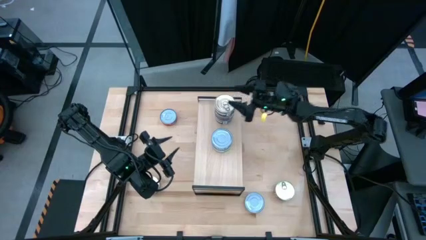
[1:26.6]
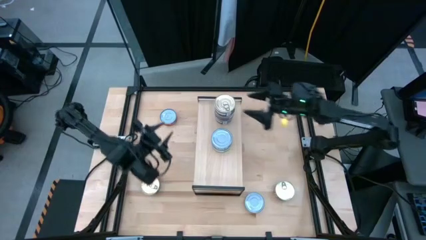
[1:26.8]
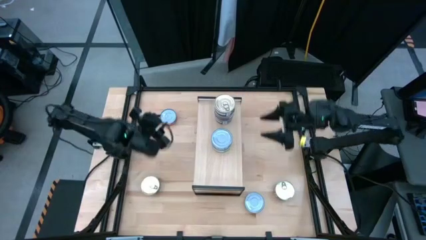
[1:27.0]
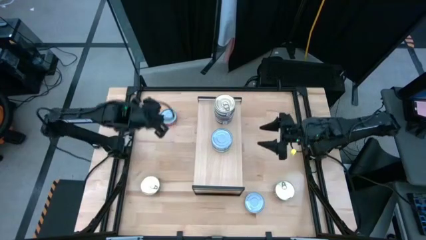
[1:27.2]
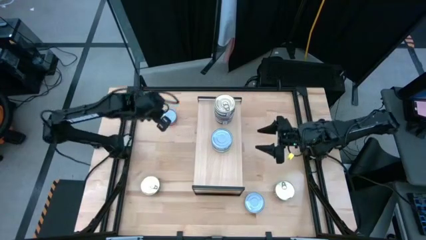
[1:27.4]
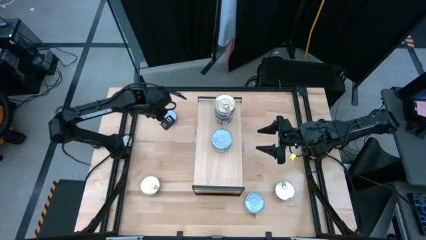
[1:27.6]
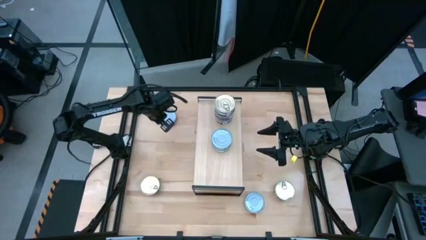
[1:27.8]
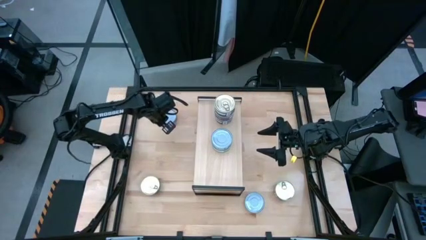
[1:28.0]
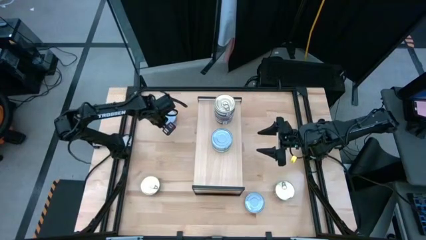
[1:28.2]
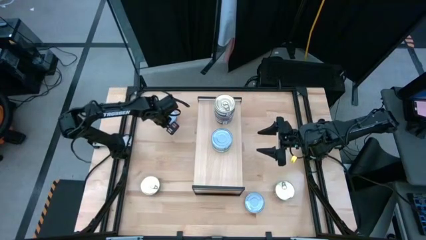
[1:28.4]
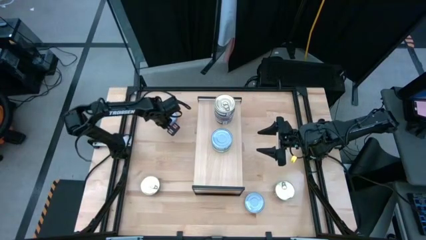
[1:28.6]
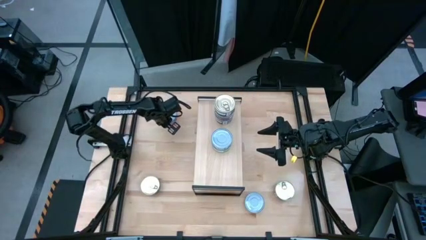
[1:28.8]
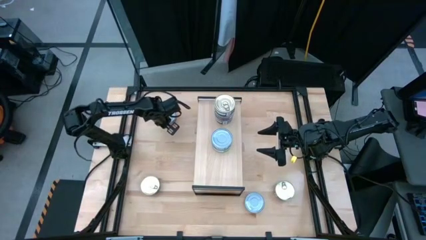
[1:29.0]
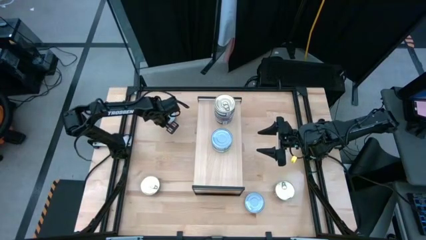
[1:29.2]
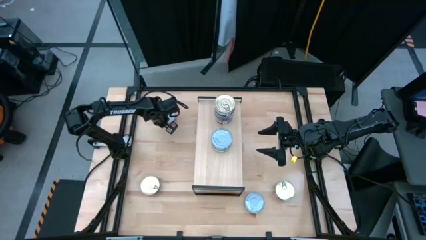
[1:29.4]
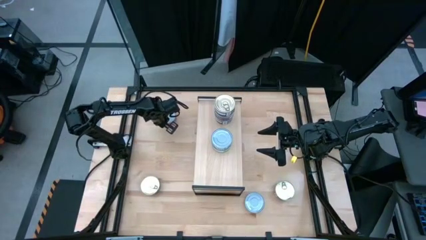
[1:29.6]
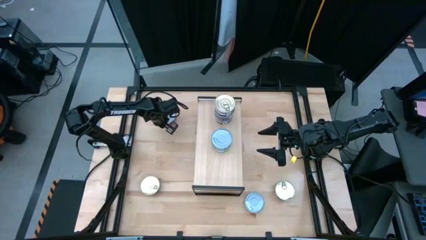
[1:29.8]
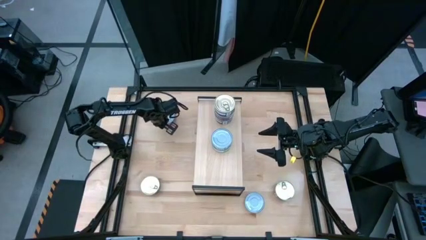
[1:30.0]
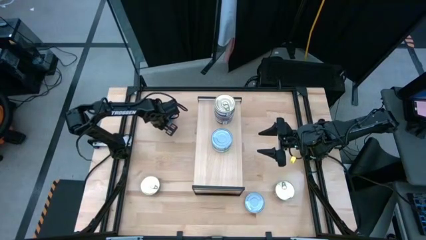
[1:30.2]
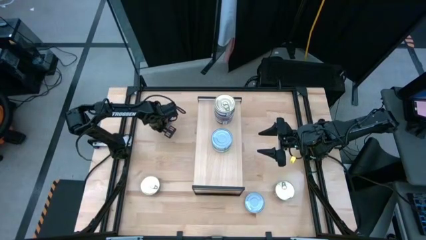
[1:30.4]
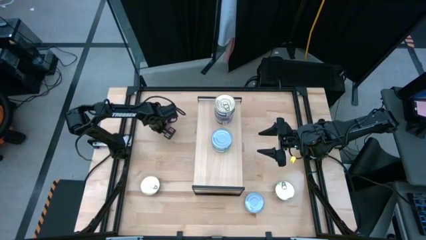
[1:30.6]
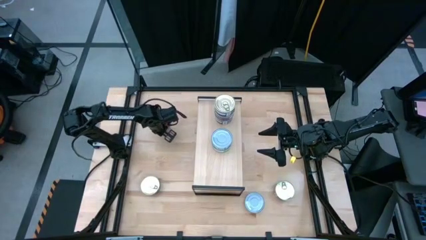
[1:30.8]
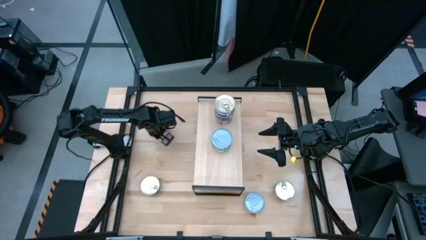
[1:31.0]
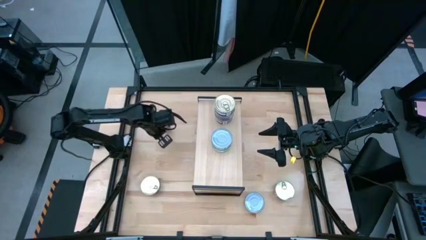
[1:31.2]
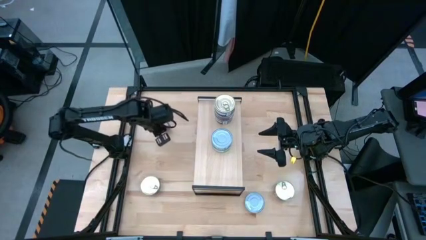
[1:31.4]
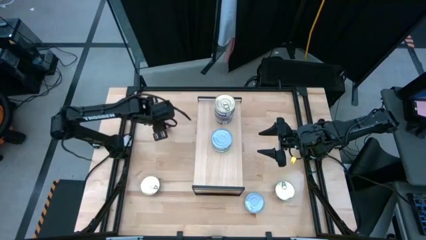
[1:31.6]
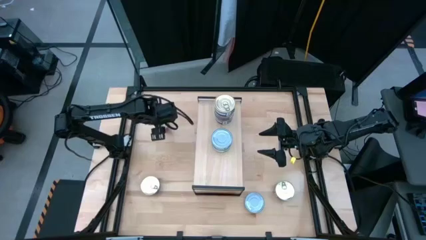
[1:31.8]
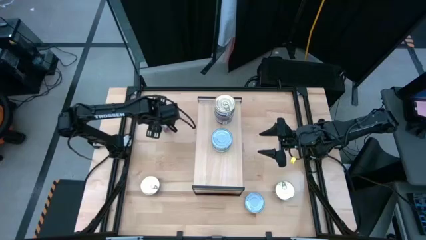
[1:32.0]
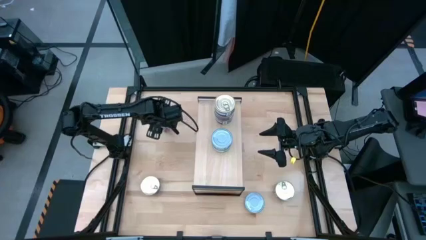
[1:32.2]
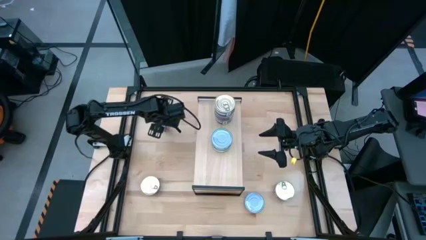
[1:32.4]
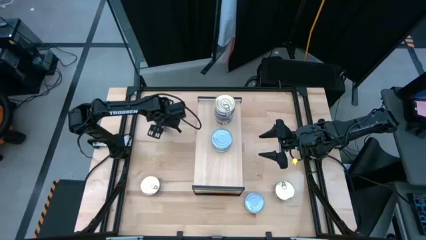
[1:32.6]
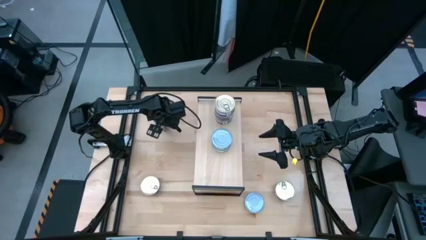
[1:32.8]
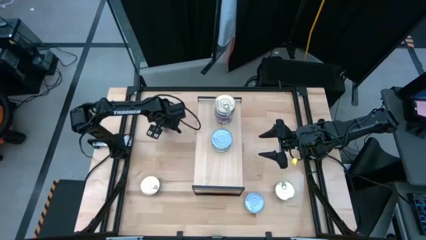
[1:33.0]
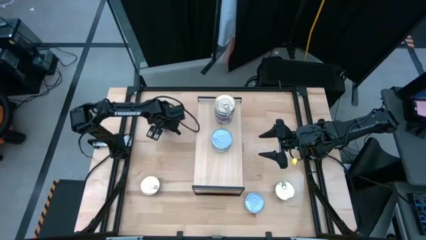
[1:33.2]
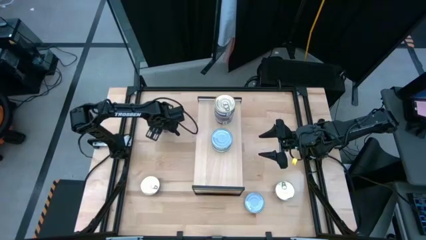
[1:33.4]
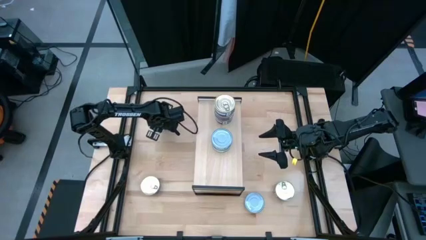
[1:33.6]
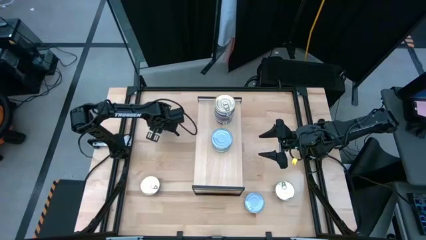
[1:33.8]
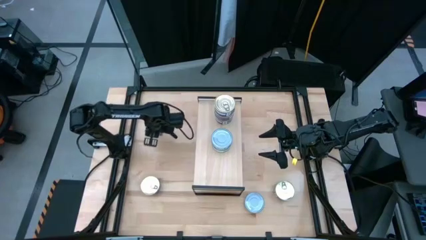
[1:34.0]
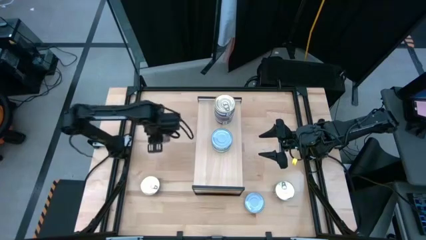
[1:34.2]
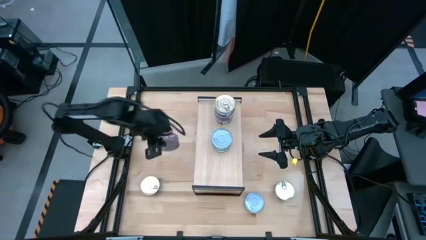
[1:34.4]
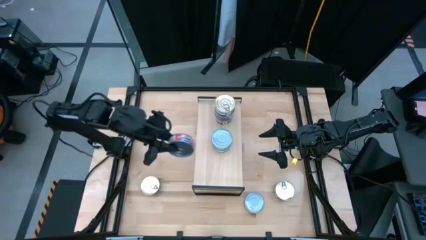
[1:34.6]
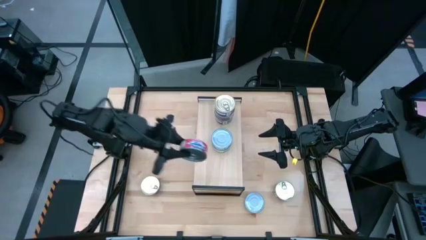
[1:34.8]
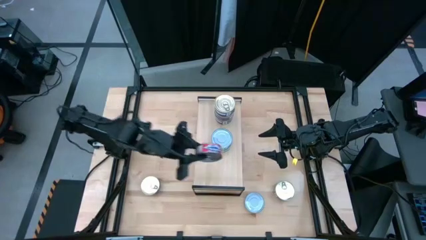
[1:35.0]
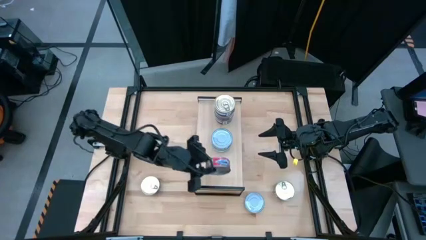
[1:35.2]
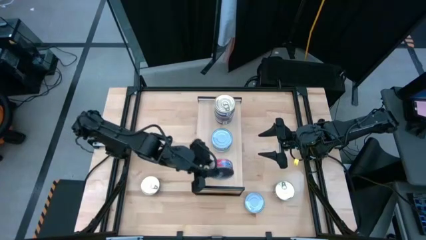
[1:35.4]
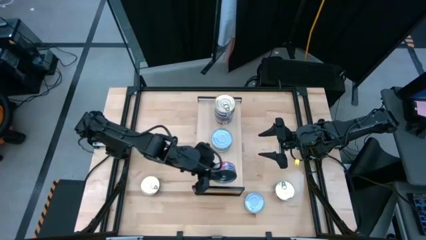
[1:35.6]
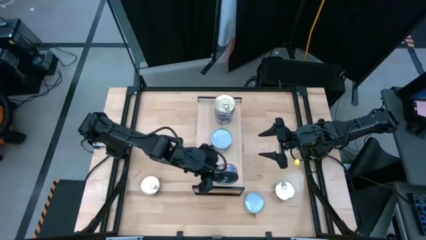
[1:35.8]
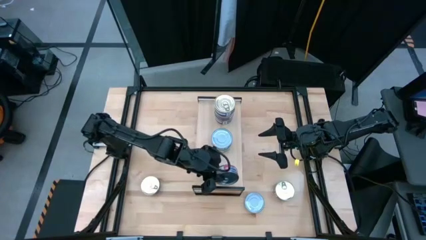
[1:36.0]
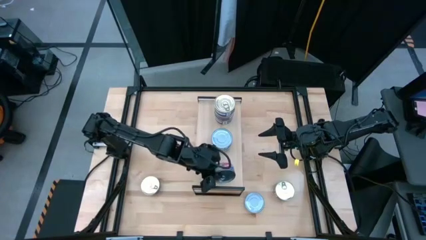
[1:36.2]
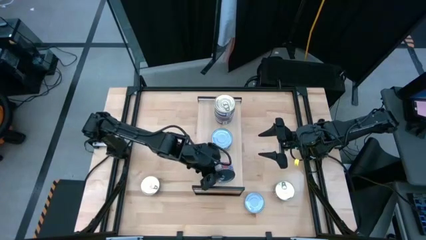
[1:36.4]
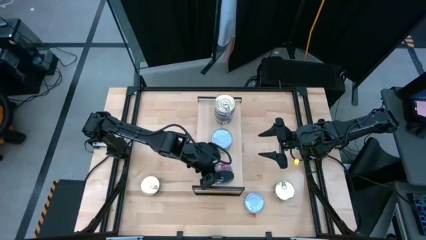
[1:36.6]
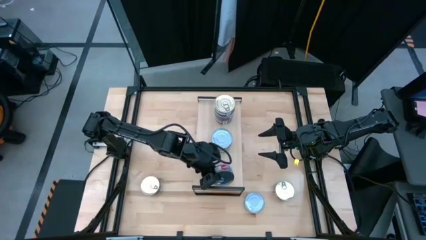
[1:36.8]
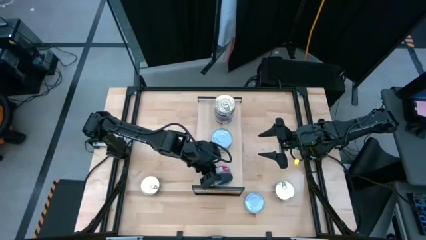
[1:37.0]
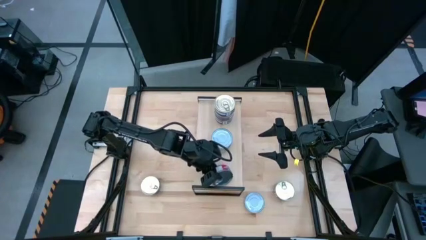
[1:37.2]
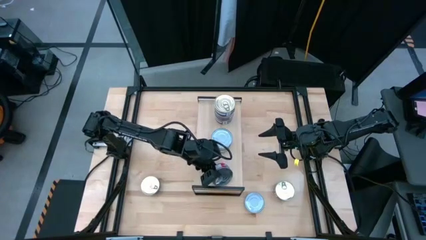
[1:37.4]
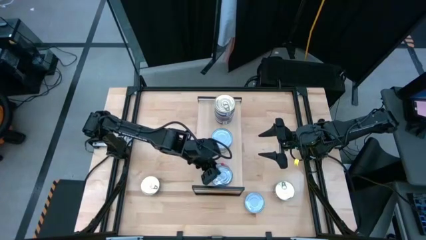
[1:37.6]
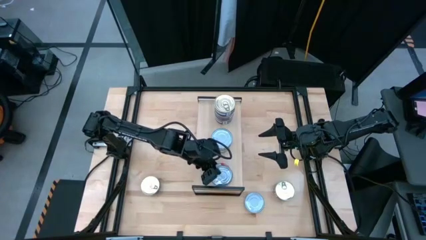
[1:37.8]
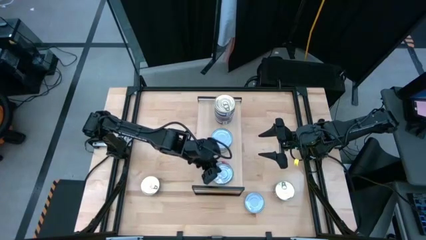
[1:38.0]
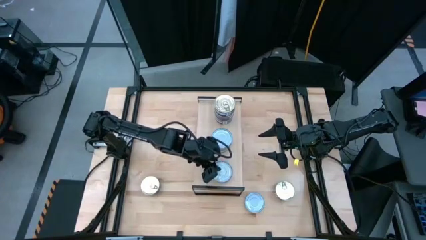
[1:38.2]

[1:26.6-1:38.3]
Task: Stack canned seafood by type on shelf
Put the red tuna can on the shelf

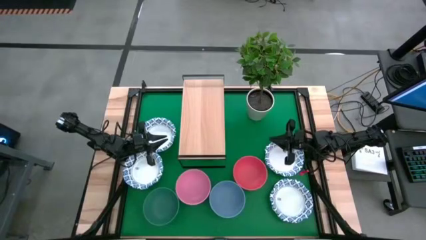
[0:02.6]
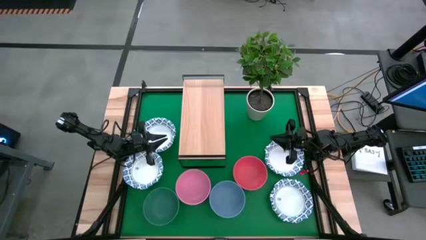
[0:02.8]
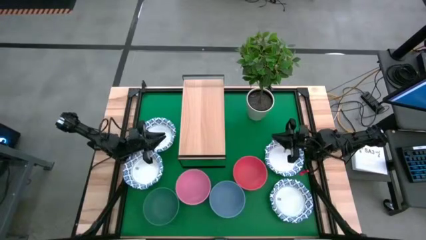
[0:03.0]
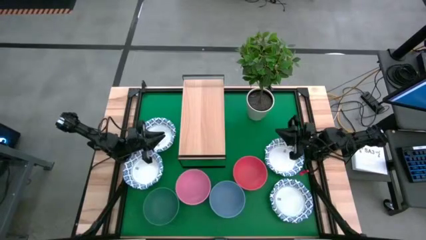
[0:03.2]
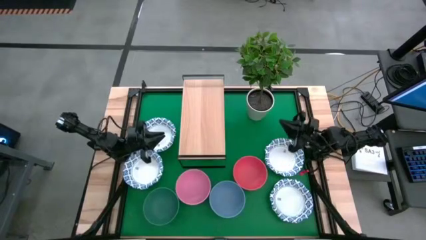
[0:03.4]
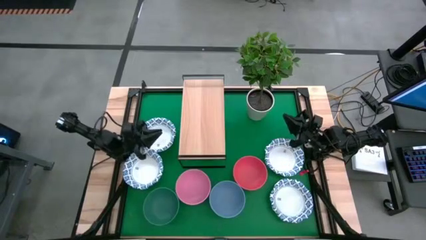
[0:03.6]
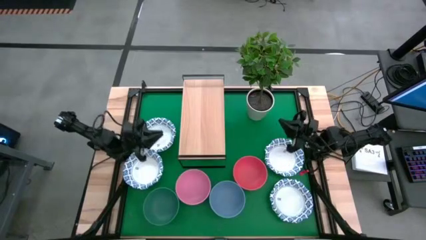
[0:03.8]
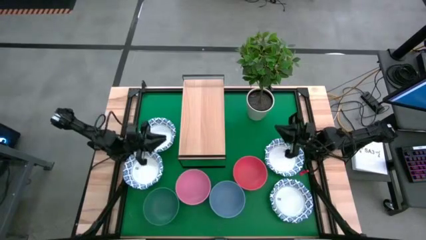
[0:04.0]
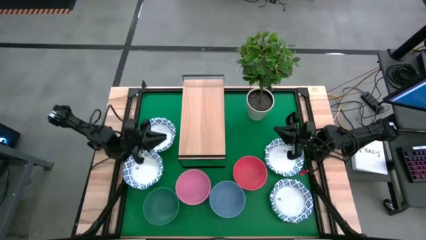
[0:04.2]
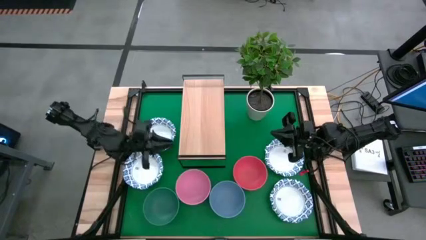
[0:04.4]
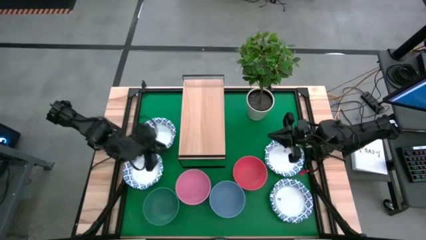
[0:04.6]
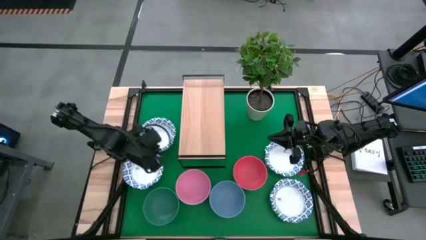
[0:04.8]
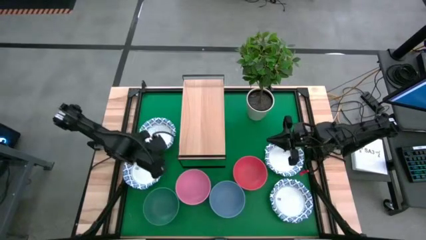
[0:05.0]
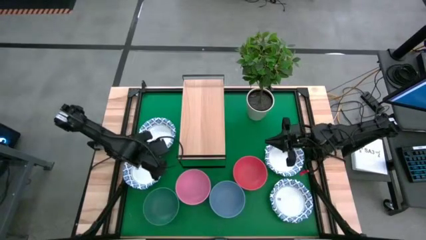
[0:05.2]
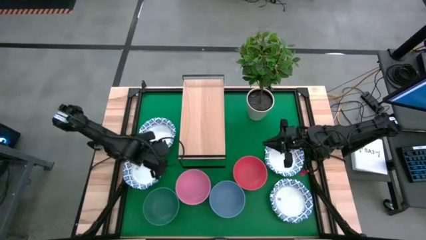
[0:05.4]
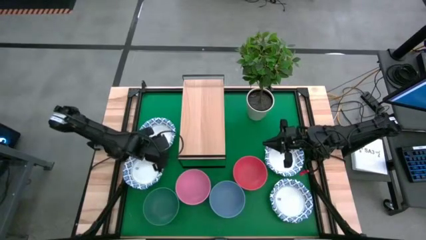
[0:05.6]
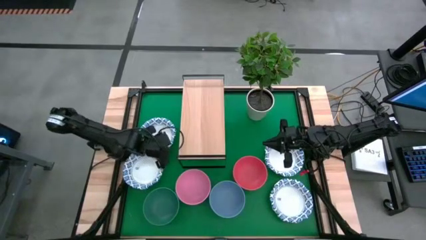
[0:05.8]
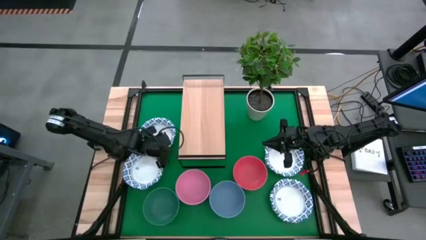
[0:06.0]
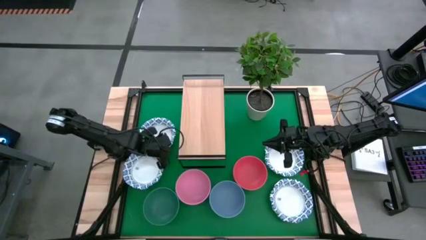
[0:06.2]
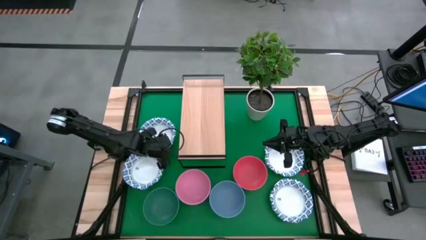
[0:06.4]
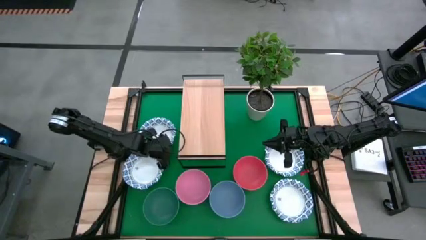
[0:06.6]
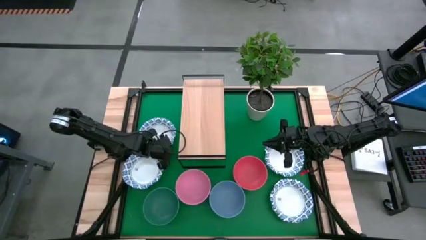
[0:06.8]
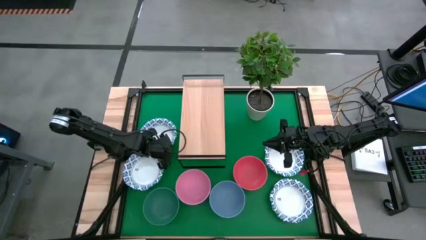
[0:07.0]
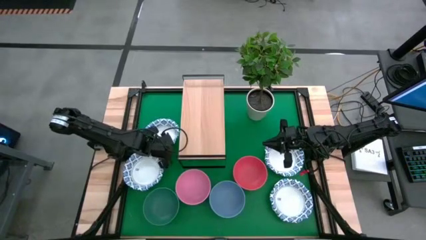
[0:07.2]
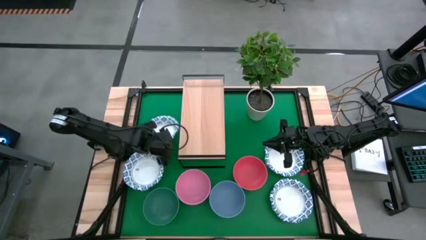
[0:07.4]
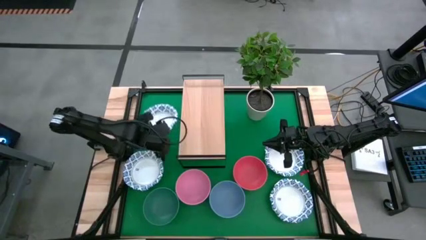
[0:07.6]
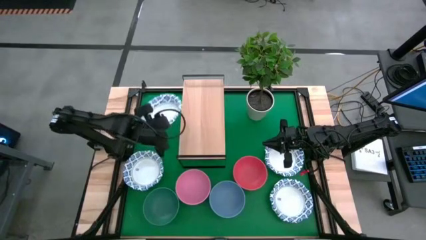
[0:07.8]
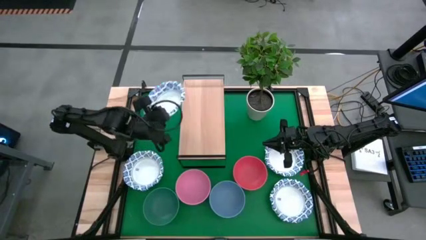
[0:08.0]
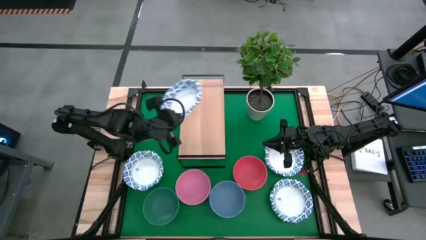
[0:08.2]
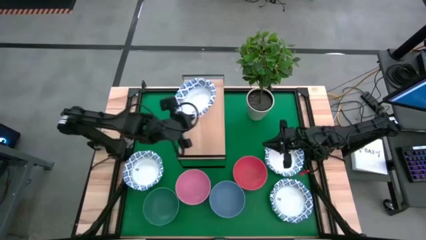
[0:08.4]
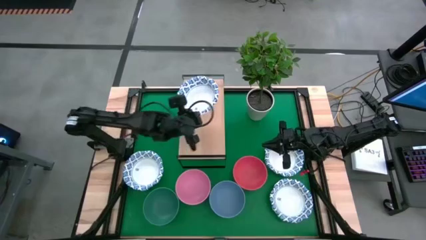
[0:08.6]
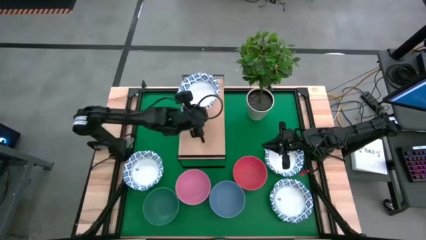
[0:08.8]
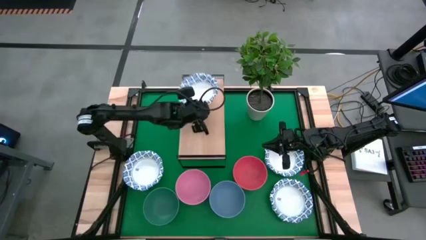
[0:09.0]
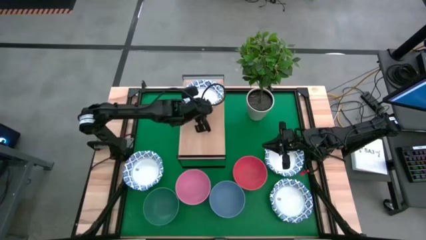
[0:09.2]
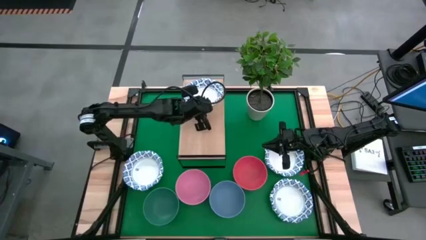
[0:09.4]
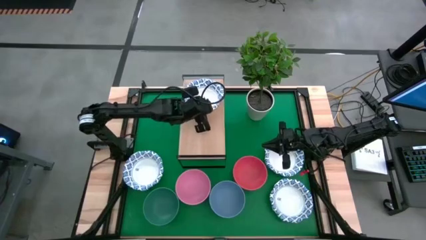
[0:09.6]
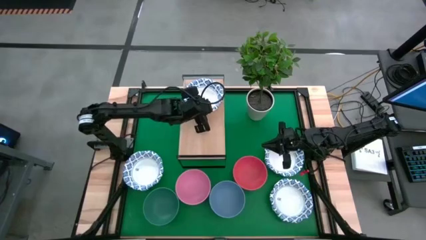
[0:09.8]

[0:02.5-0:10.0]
Task: Place and stack bowls onto a shelf
Put the white patterned bowl on the shelf
